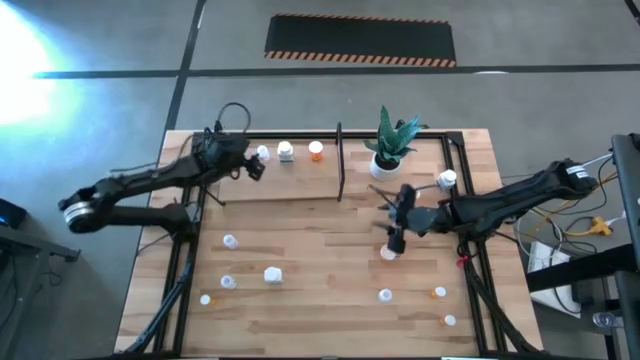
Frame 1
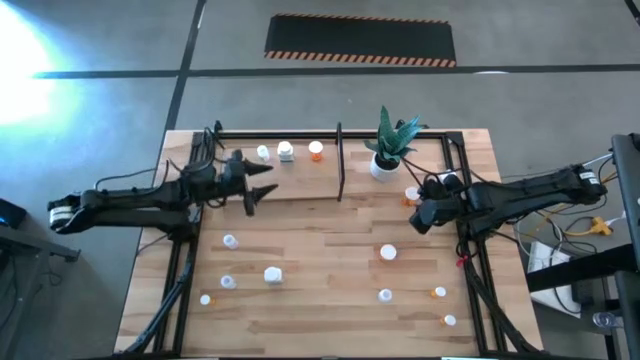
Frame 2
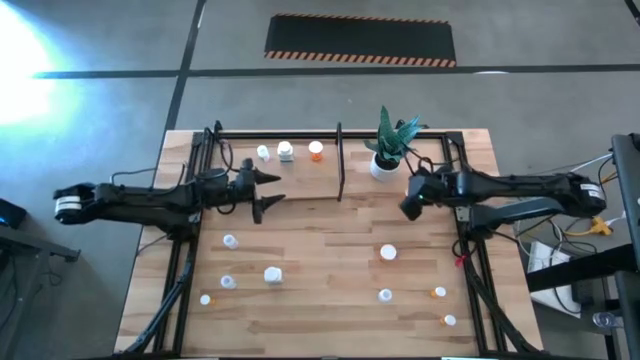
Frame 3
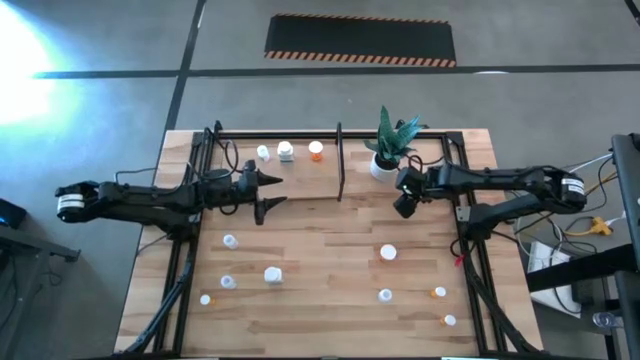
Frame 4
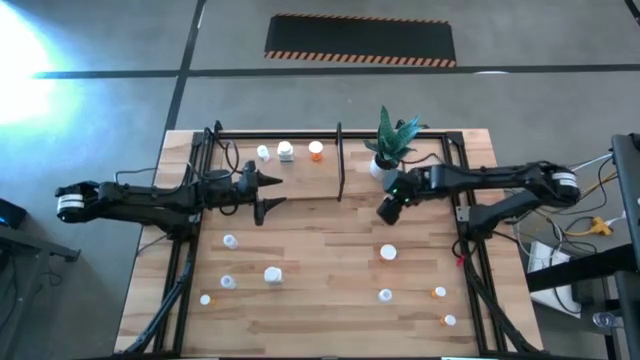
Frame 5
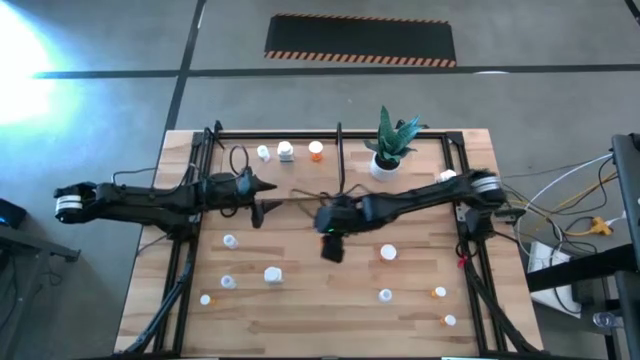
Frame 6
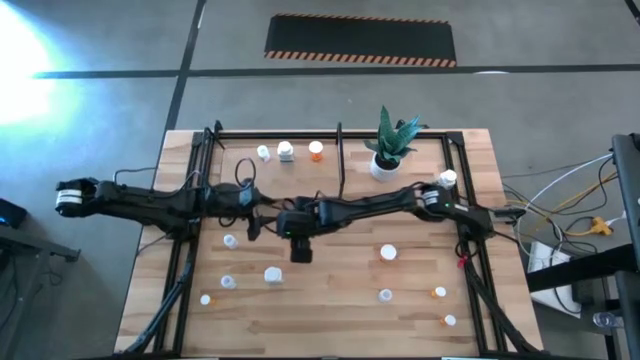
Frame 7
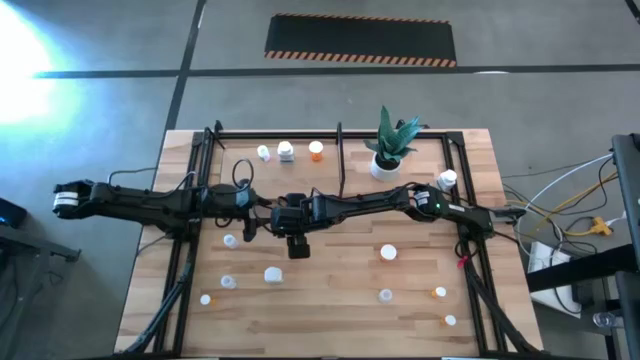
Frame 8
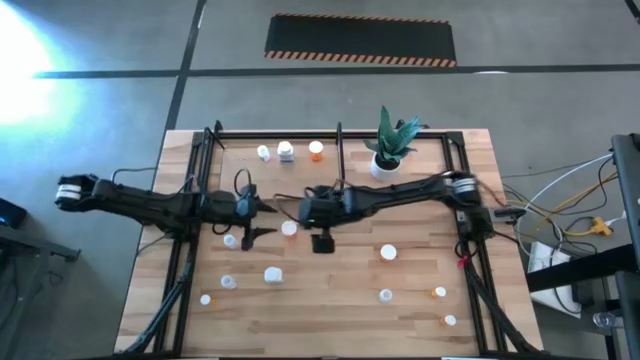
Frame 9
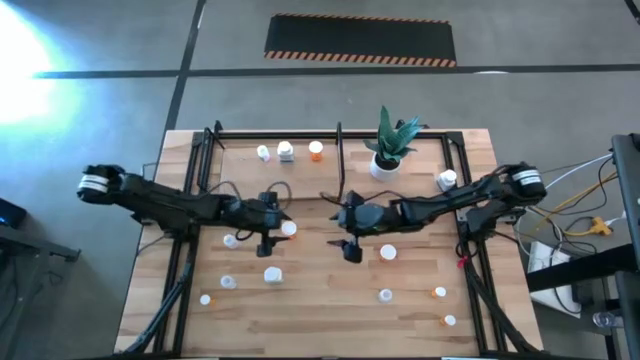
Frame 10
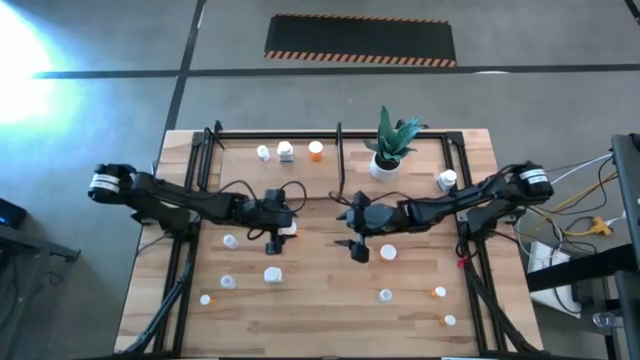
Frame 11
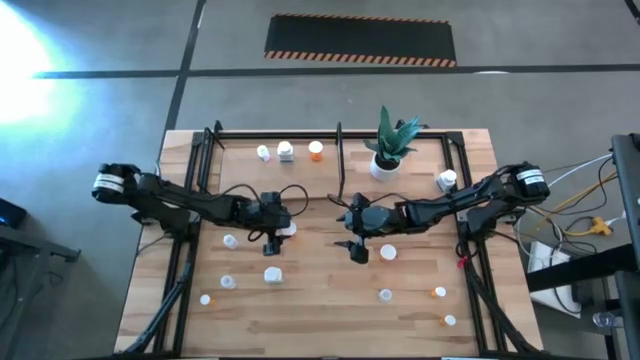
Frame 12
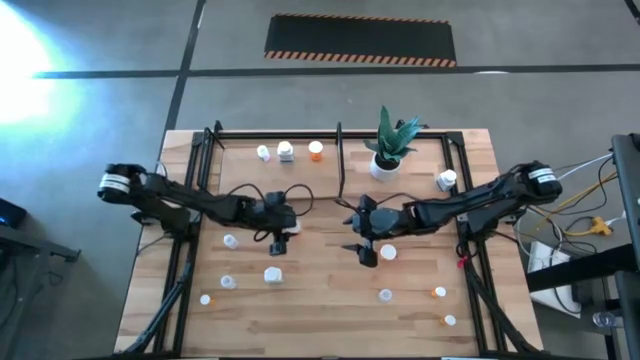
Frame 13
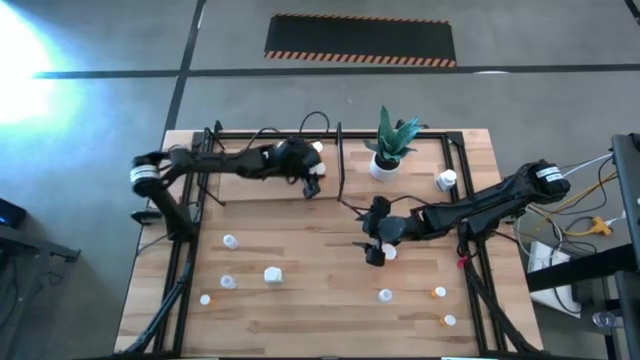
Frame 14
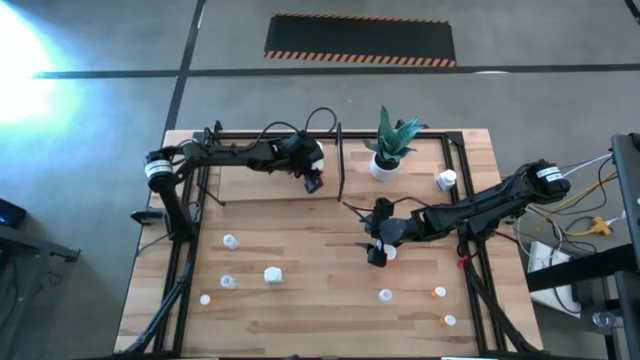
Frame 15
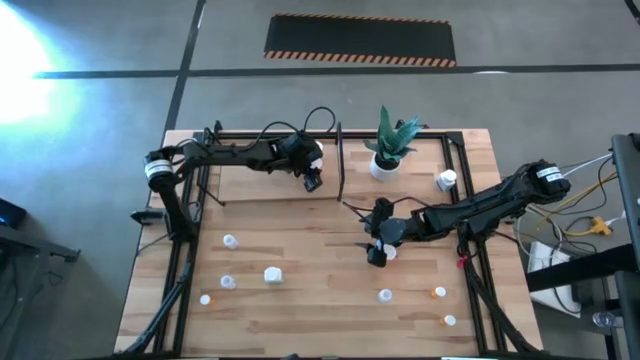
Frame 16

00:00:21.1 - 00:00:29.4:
Task: Pick and place medicine bottles onto shelf by color
Put the orange medicine container on the shelf

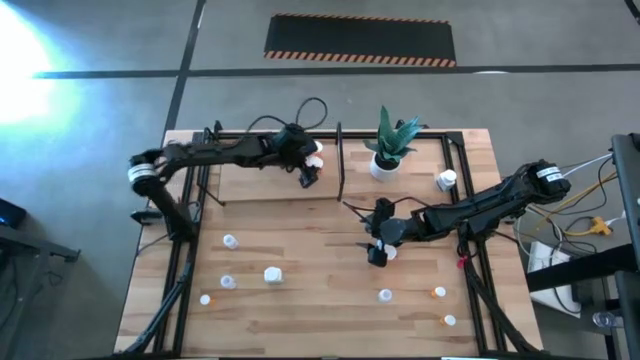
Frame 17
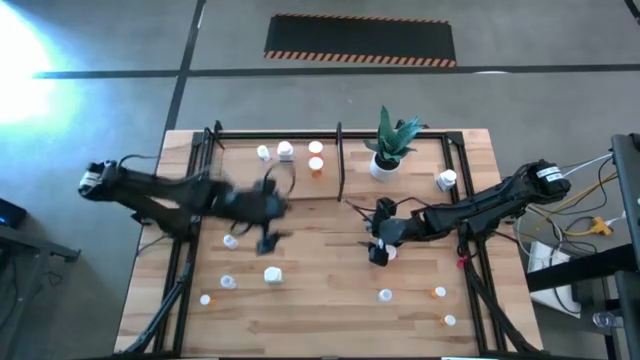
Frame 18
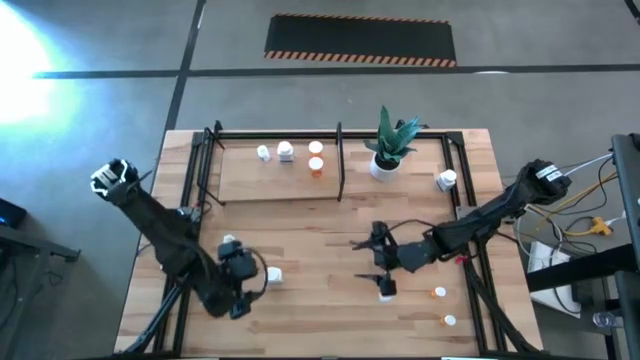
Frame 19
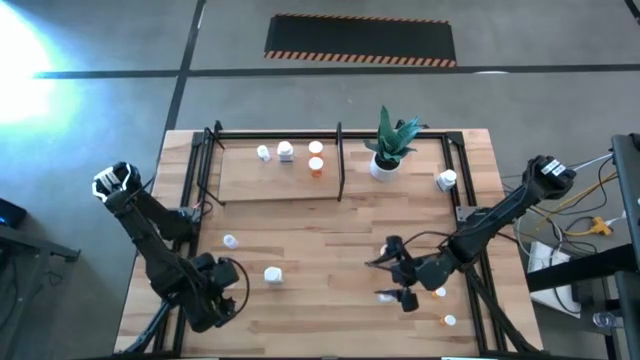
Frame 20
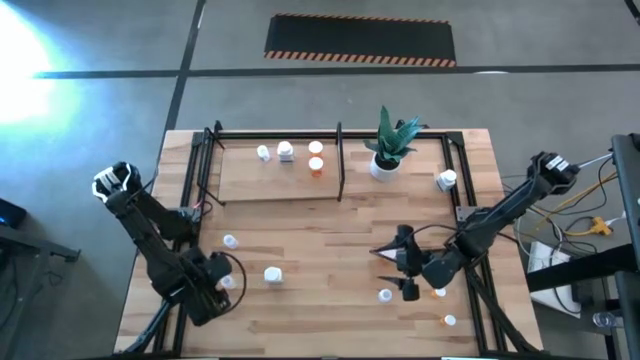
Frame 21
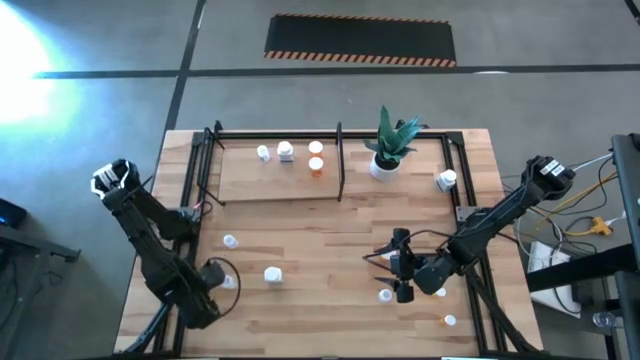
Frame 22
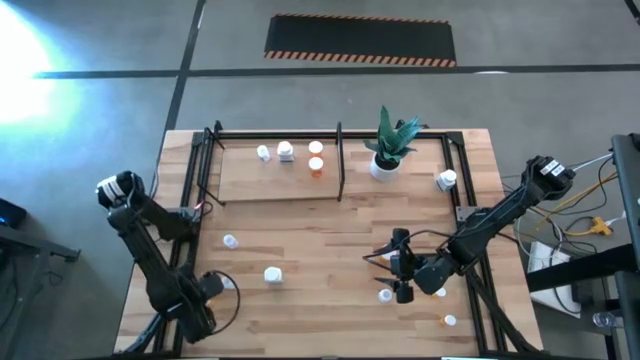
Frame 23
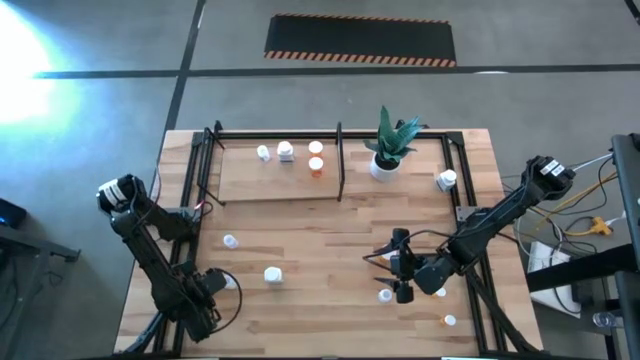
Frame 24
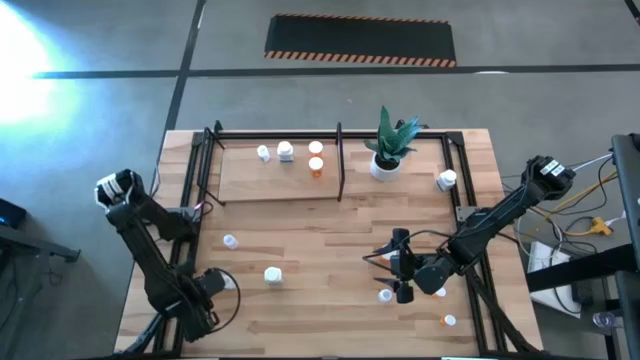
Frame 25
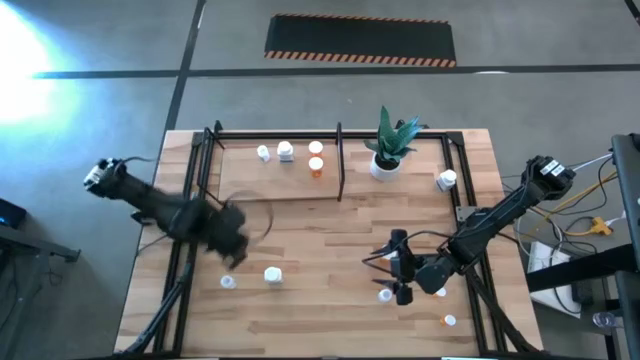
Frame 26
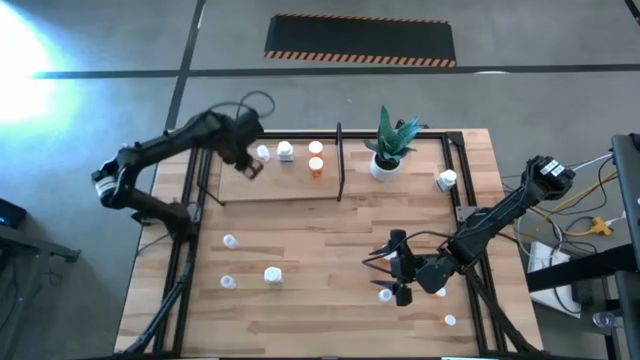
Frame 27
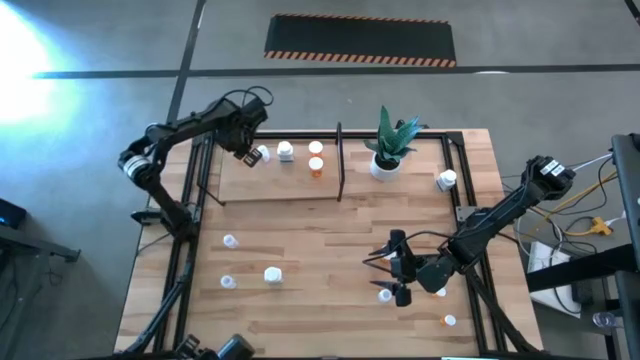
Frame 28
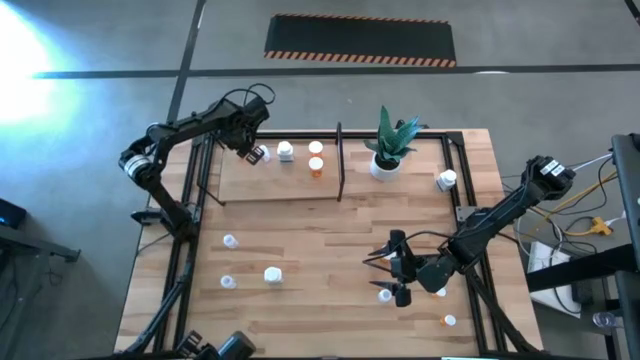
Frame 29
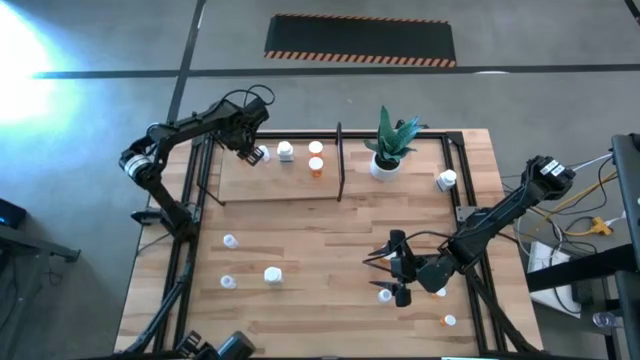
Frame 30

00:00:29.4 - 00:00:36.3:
Put the small orange medicine container on the shelf

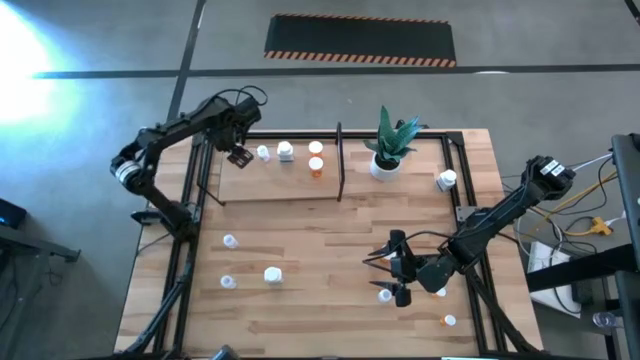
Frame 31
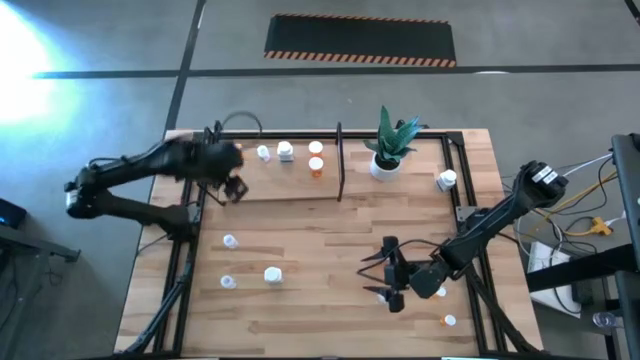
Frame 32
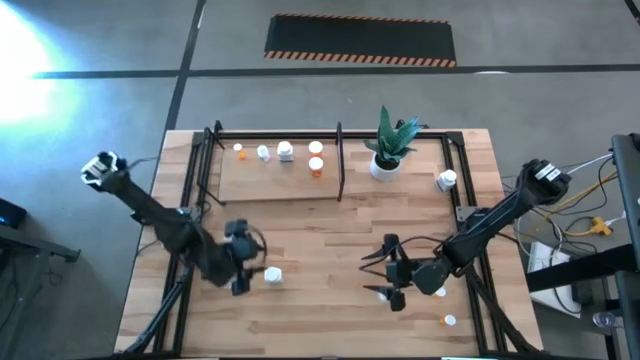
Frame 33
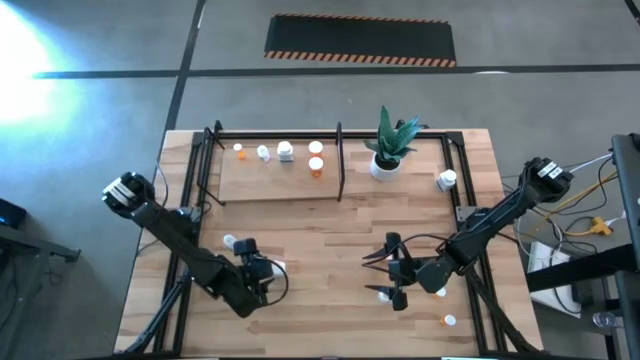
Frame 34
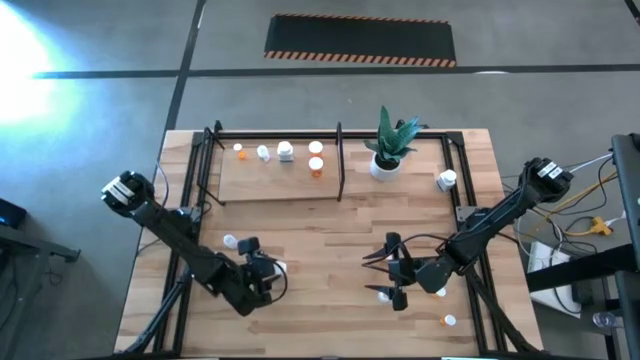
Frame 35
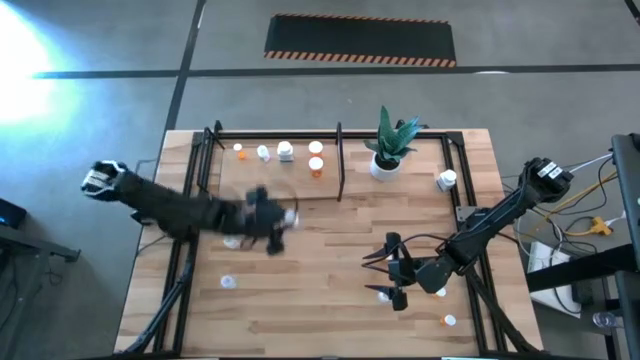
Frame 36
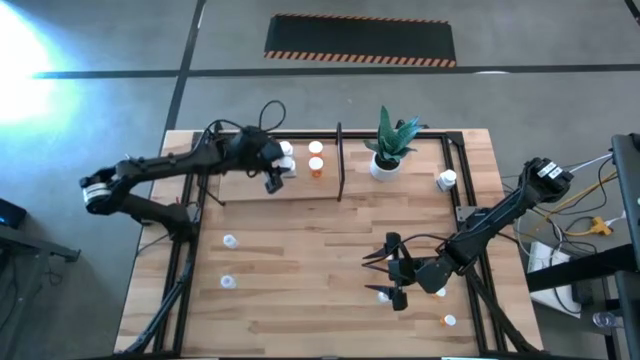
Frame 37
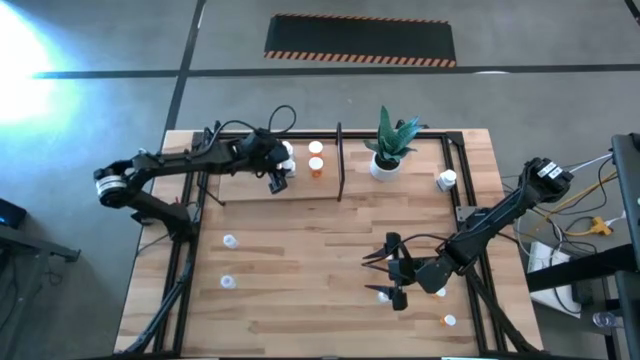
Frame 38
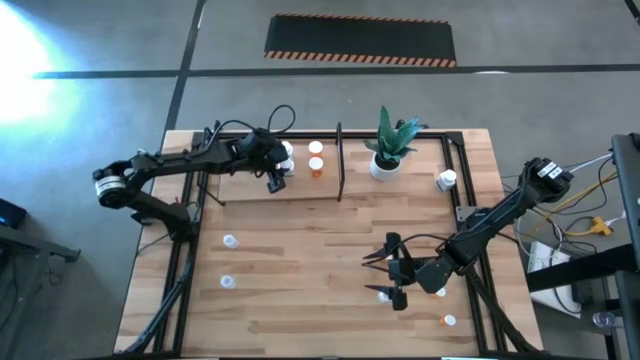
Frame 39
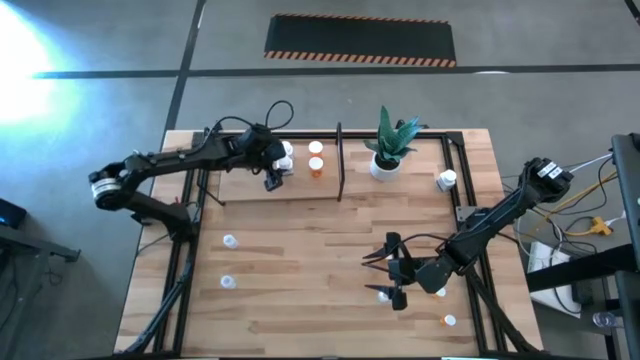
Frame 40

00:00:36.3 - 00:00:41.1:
Put the white blue medicine container on the shelf

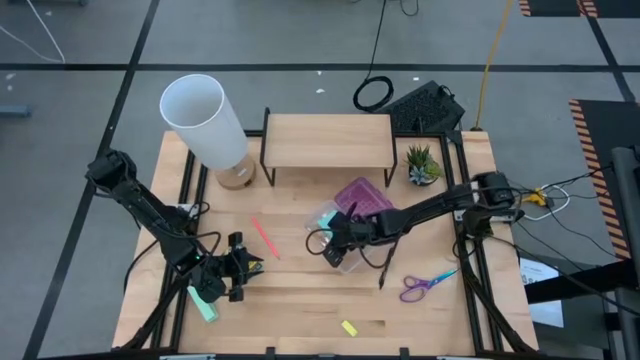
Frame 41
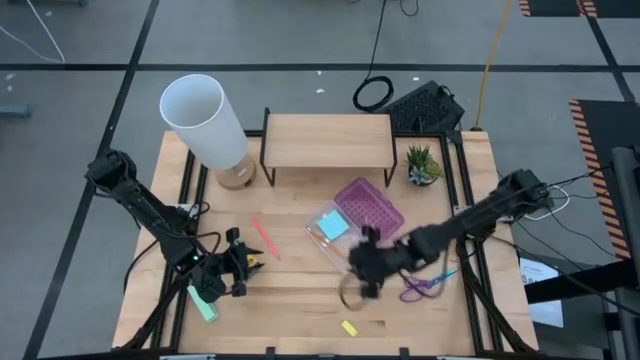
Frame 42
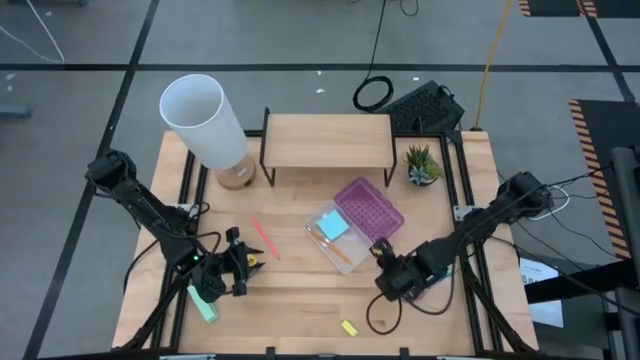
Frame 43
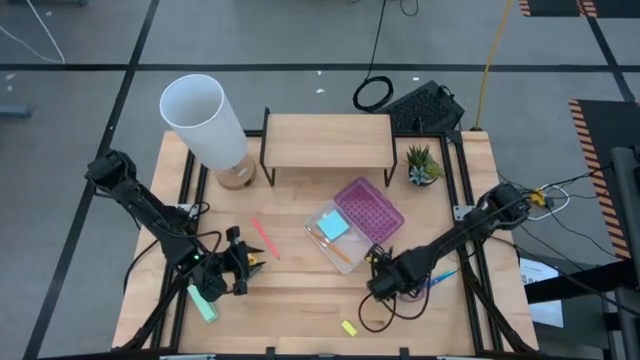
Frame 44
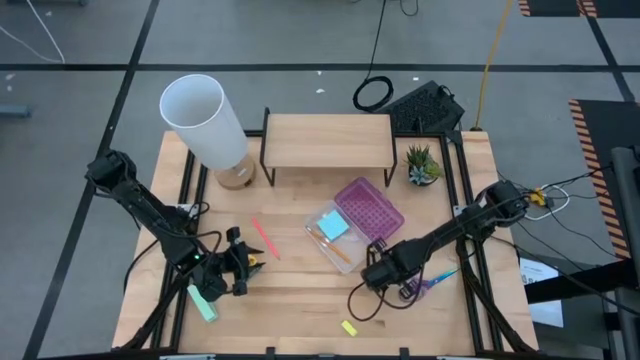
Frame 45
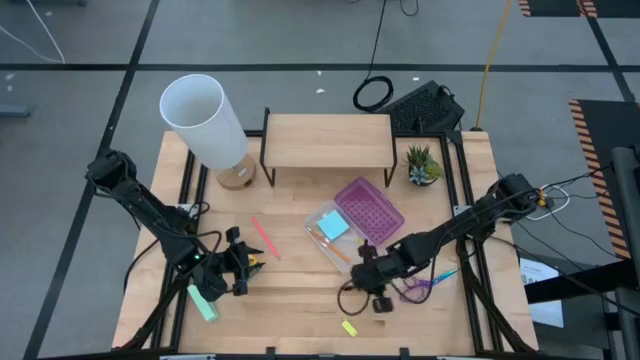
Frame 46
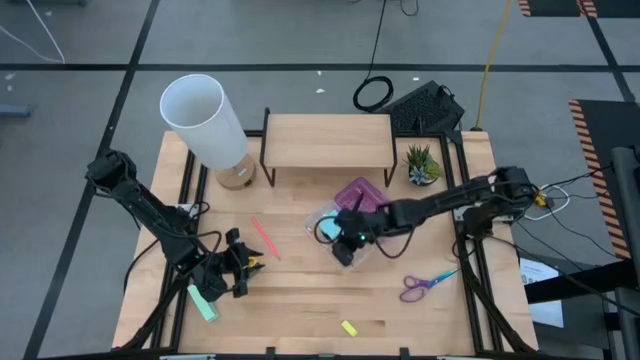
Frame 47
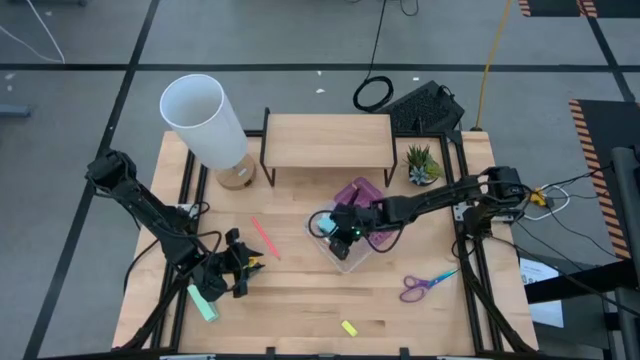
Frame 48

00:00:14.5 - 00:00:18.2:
Task: Pack school essentials
Put the pen into the transparent violet supply box
